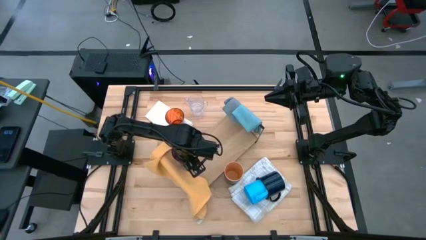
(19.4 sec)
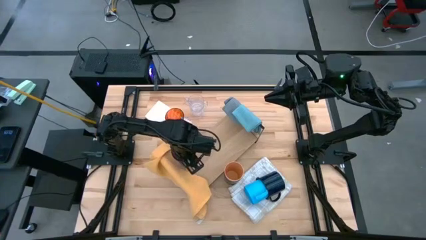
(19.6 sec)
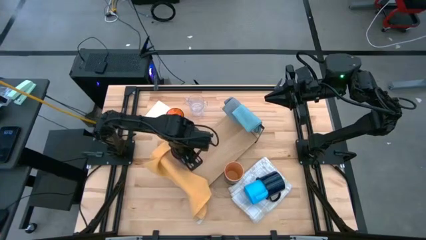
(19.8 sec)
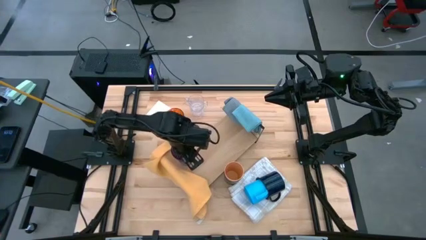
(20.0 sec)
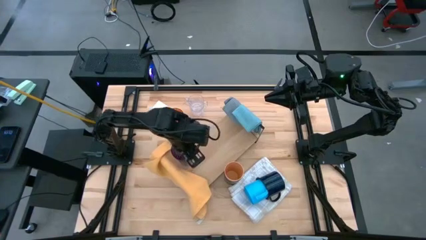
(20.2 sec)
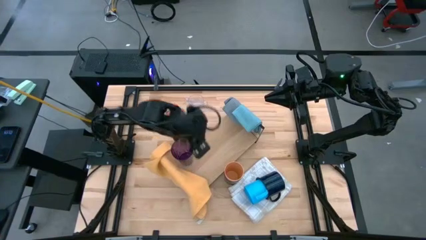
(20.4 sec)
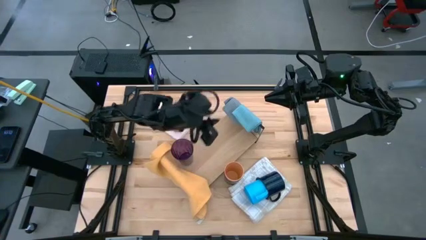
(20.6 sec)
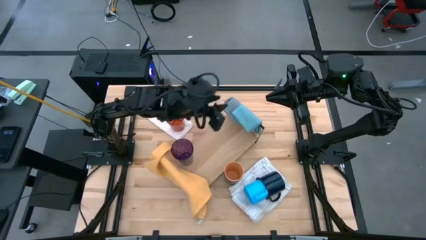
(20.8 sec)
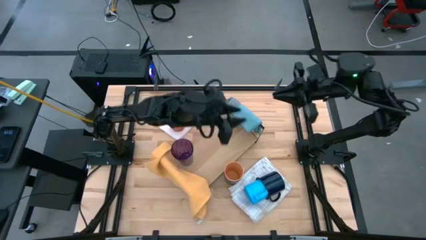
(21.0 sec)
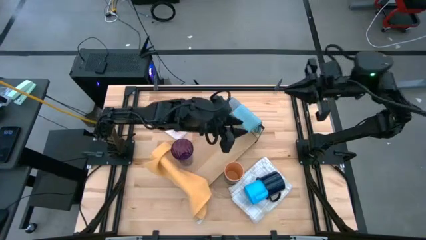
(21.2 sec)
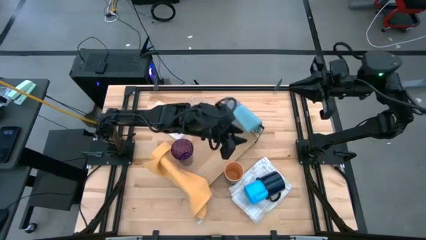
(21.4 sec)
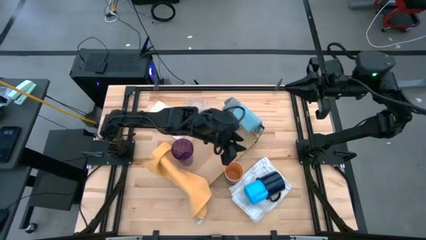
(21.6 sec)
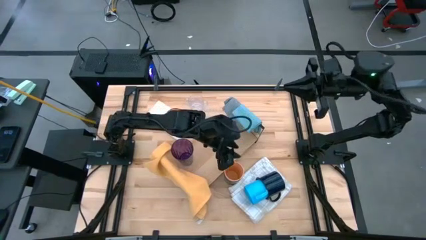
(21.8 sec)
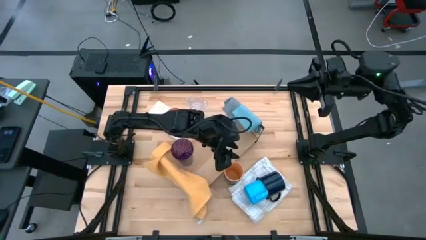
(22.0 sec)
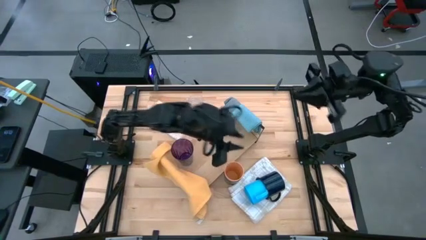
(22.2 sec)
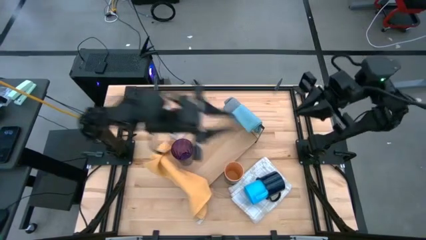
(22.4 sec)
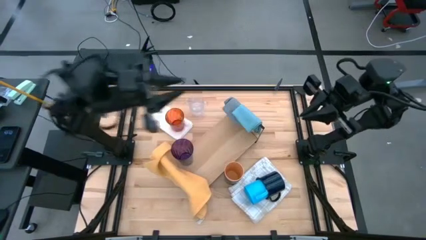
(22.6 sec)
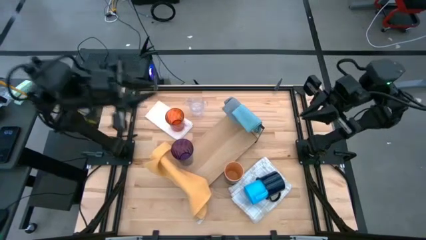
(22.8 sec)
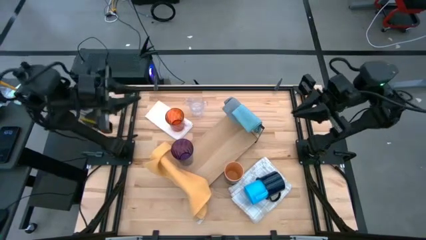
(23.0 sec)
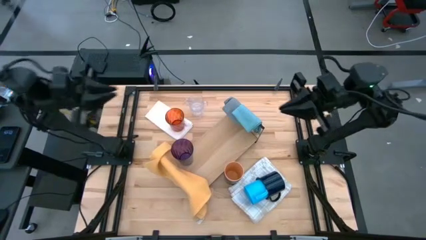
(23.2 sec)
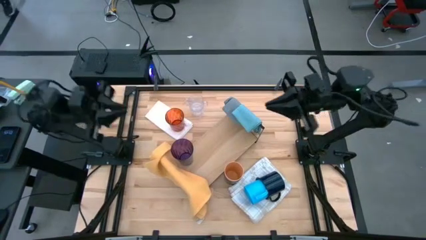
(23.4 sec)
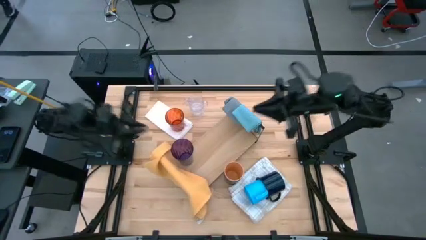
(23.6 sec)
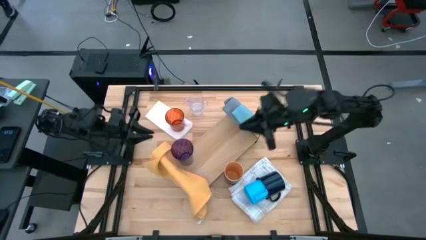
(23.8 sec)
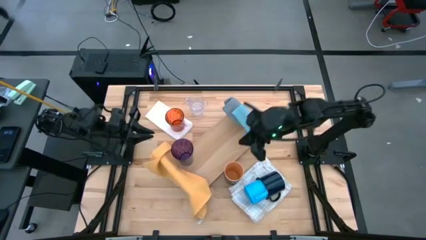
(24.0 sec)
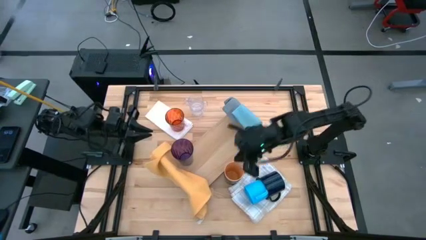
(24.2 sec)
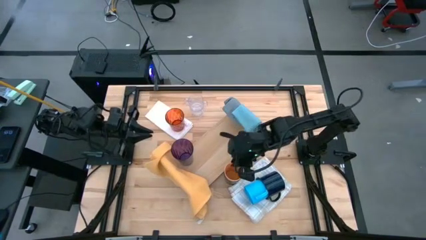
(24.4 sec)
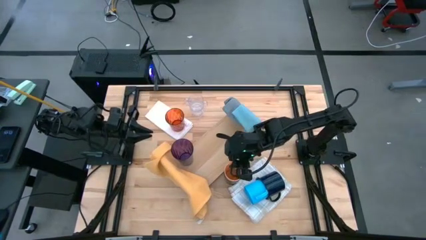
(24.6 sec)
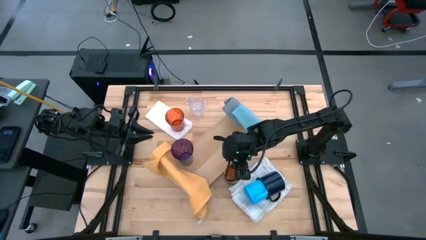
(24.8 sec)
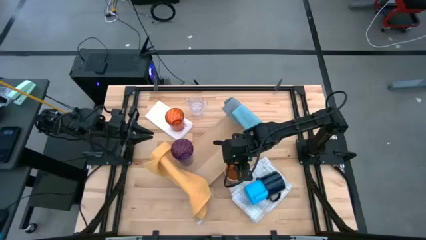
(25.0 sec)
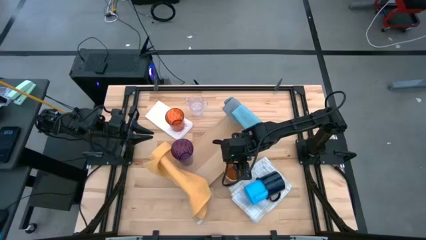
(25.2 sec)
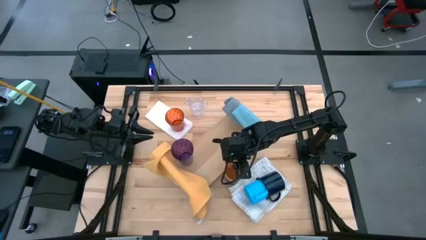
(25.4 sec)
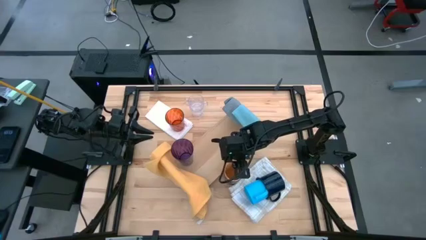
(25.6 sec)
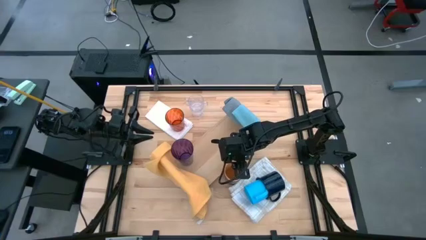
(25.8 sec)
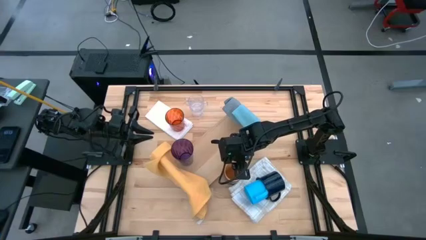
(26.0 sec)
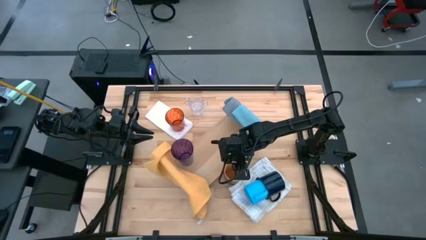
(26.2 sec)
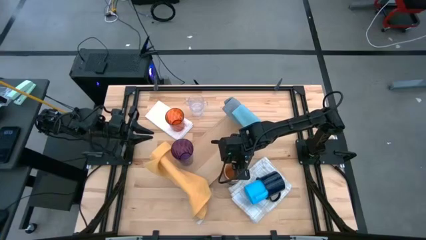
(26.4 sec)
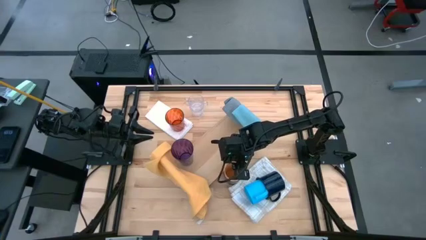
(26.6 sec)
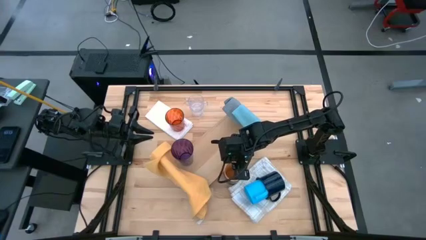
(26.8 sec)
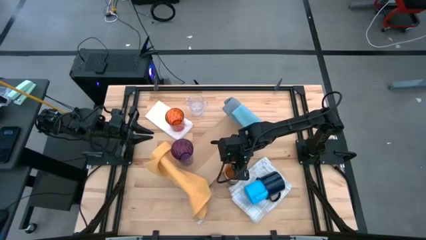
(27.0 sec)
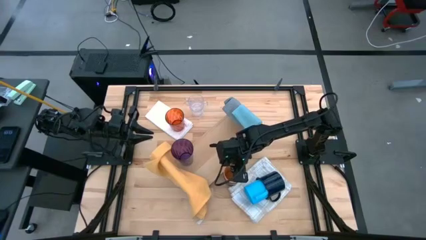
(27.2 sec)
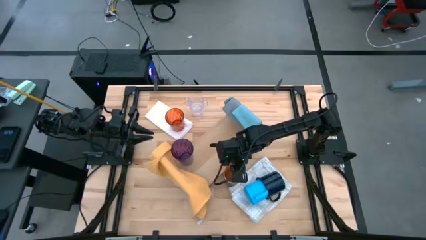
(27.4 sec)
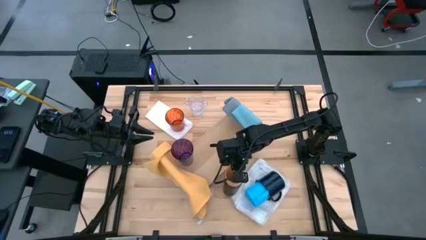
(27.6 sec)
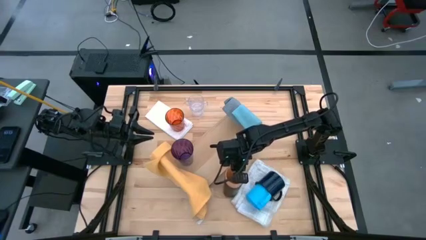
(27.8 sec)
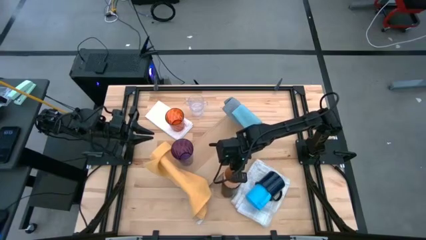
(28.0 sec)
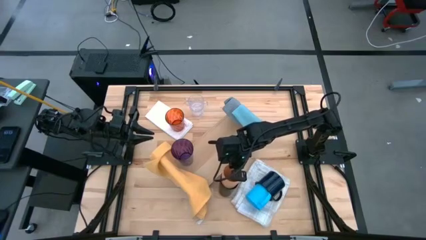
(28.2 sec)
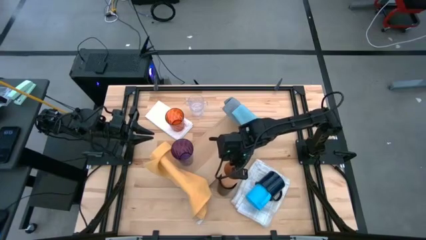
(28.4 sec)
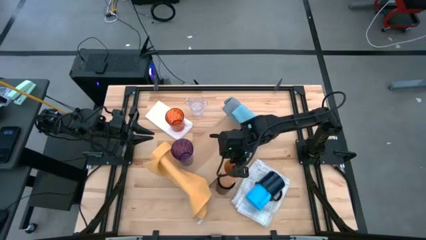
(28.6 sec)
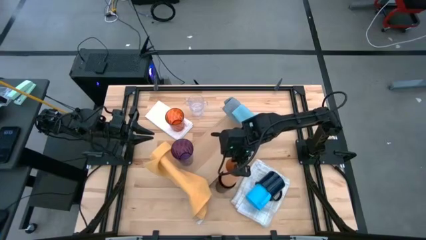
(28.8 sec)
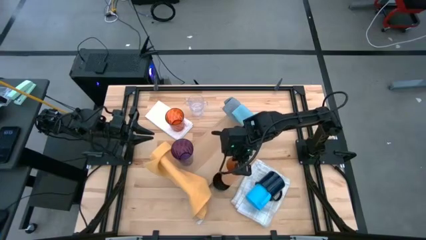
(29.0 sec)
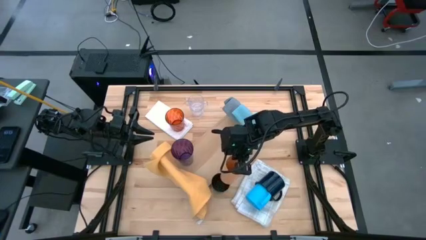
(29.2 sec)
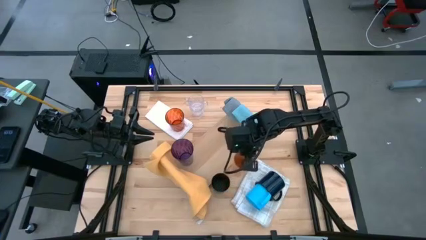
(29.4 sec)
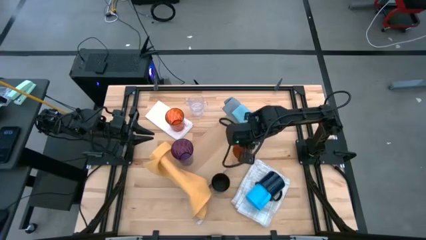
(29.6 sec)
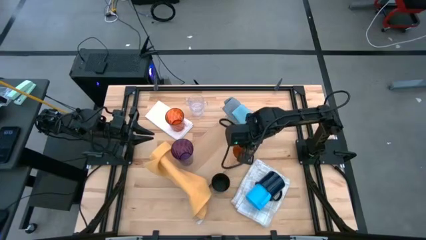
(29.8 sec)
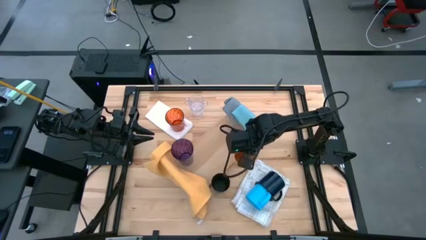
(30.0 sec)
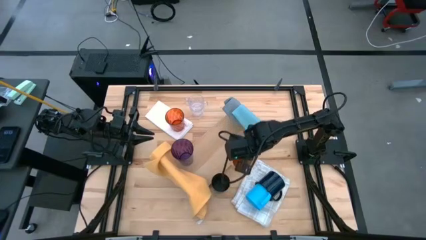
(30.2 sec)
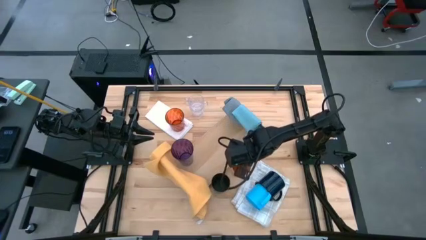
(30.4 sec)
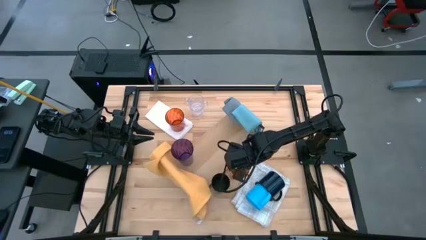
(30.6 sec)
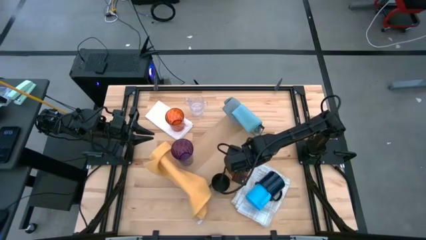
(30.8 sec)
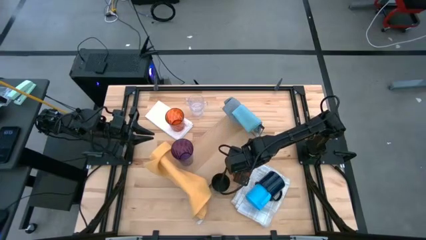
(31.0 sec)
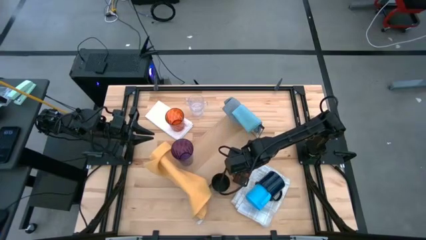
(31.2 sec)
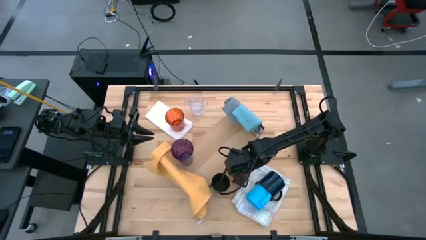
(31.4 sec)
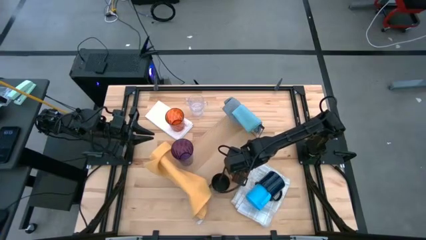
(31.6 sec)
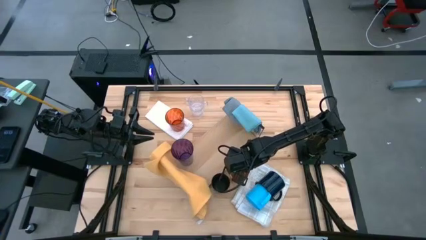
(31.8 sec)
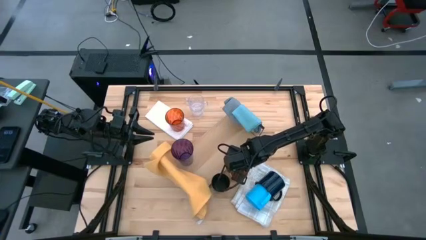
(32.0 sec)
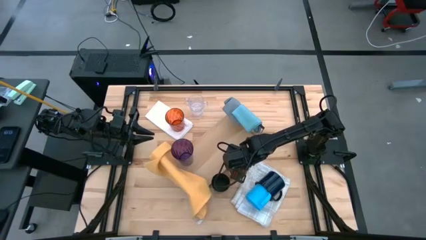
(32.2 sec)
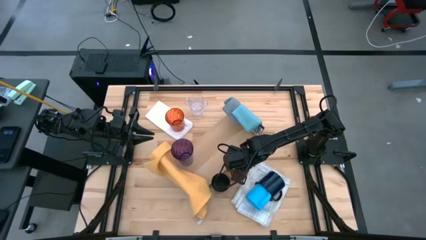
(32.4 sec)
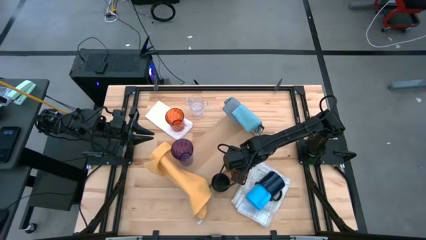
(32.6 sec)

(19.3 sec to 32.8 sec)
Task: Stack small to large cups/mugs on shelf
Remove the orange cup from the top of the black cup
